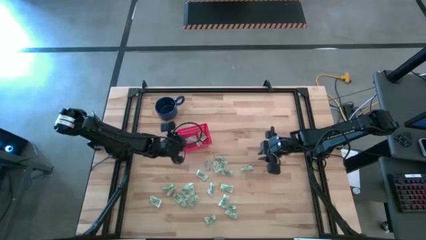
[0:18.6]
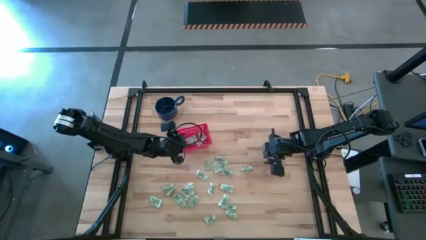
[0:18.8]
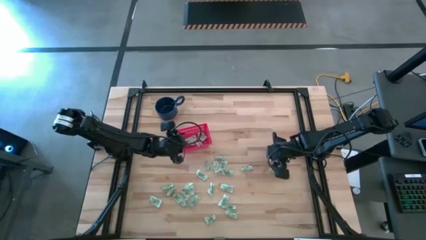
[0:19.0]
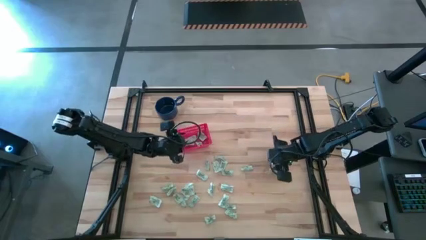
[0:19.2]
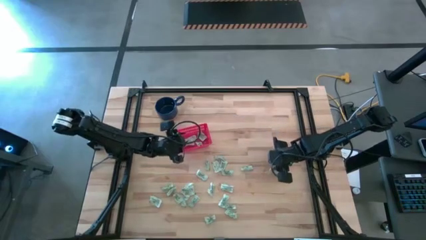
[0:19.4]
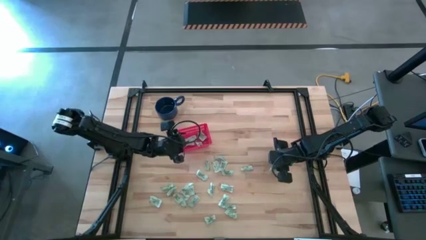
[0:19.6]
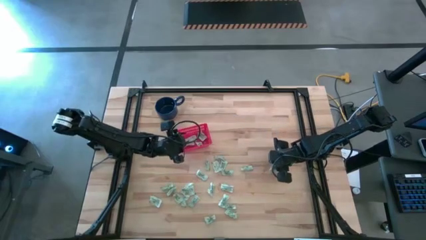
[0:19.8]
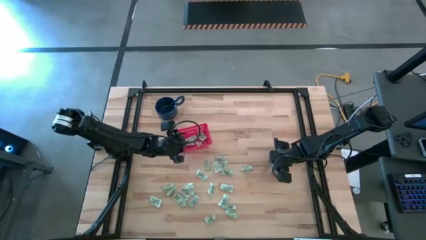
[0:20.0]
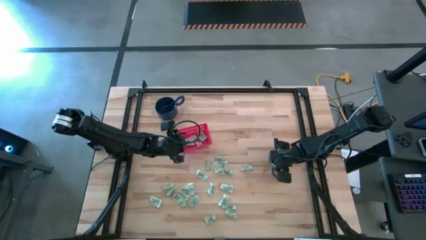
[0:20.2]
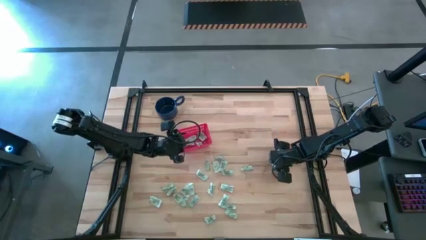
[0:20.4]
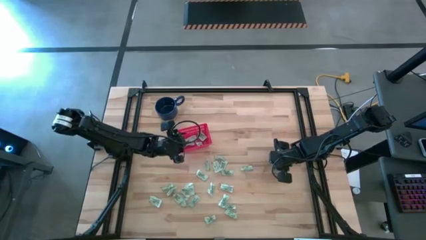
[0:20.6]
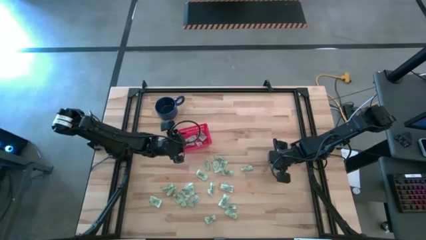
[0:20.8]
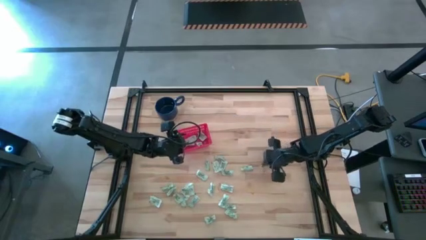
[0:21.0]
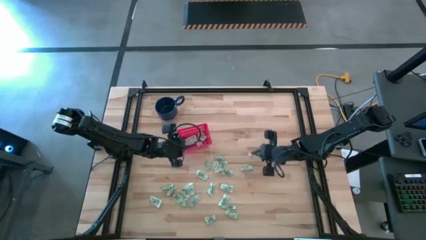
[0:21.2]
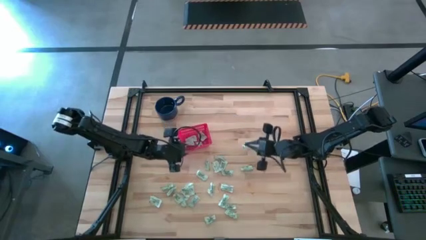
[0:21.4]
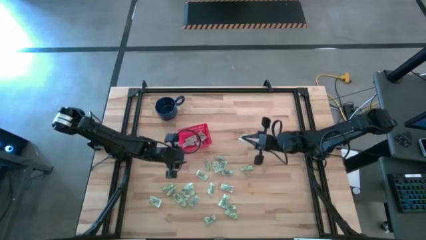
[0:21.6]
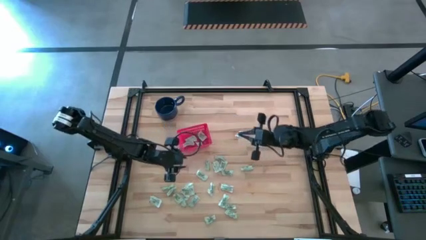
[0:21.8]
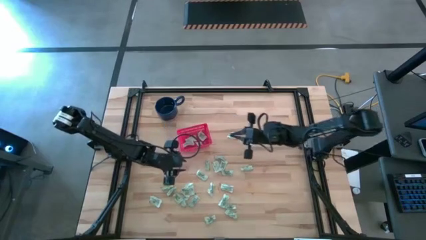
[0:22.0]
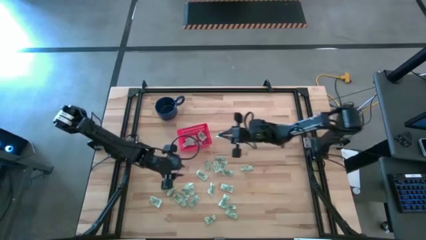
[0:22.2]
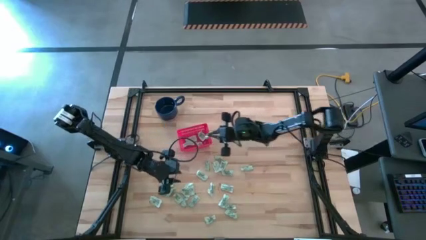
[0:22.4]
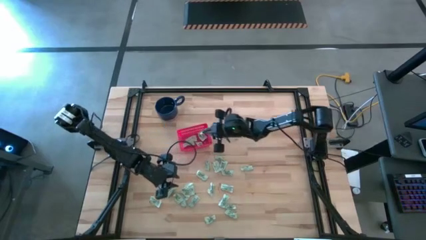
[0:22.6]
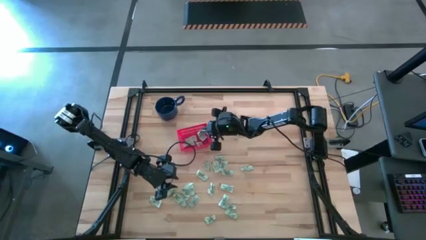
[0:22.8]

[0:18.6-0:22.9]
Task: Pick and place items into bin
Put the green stevia packet into the red bin

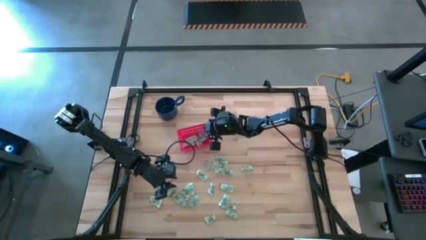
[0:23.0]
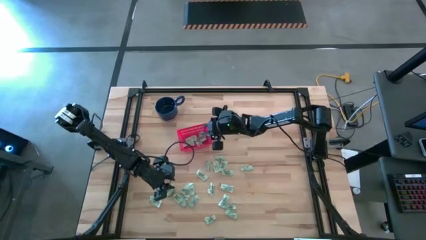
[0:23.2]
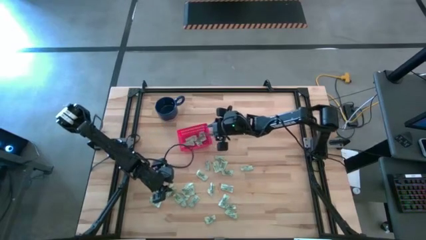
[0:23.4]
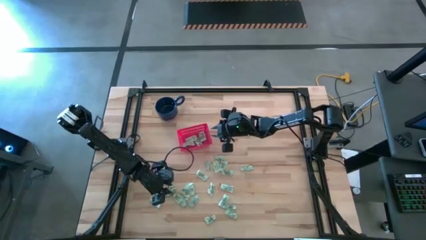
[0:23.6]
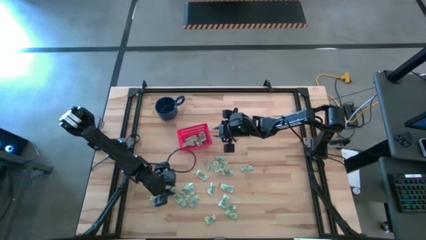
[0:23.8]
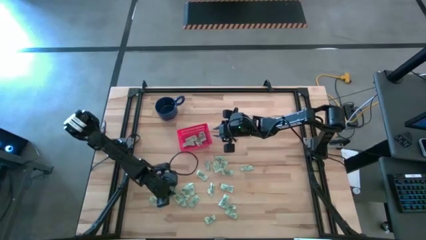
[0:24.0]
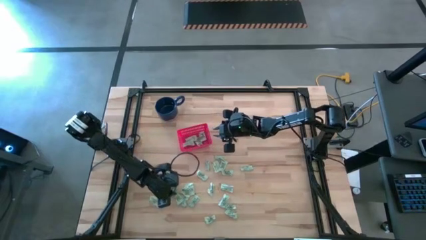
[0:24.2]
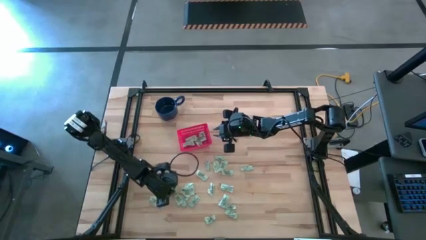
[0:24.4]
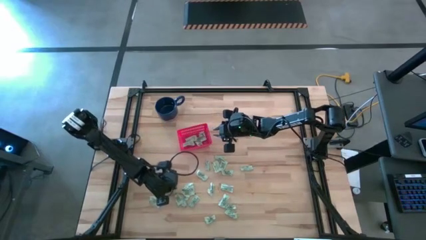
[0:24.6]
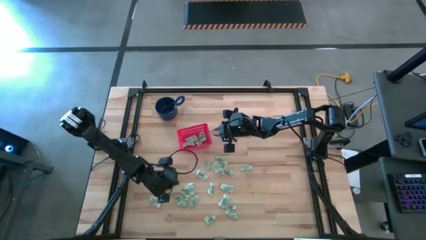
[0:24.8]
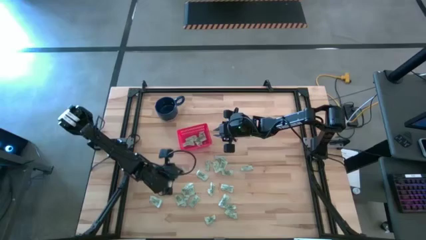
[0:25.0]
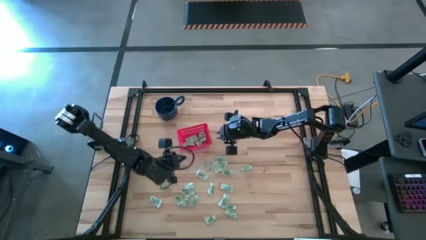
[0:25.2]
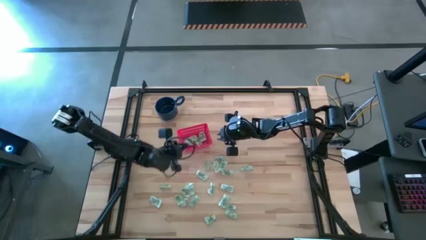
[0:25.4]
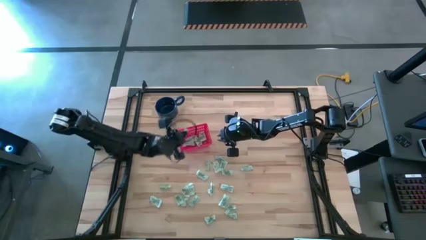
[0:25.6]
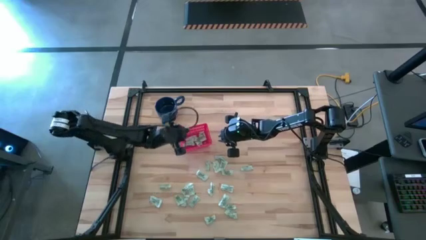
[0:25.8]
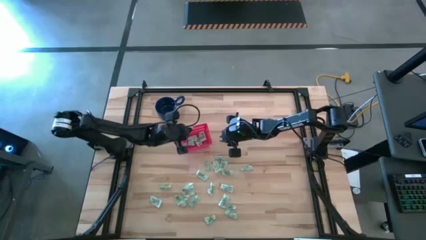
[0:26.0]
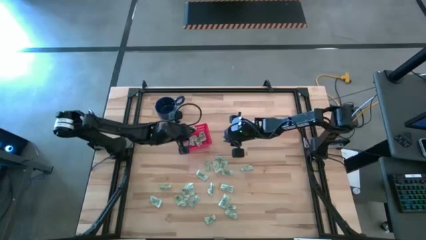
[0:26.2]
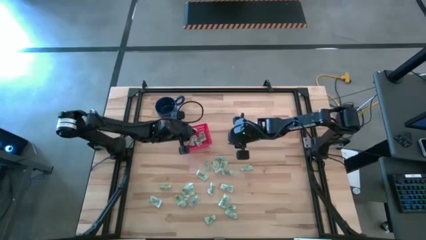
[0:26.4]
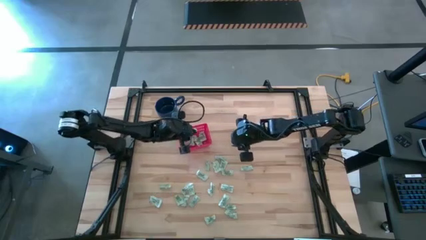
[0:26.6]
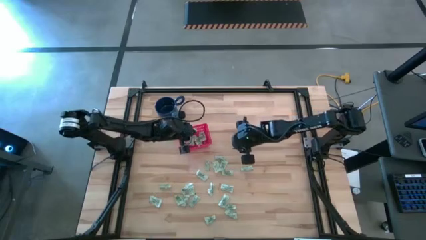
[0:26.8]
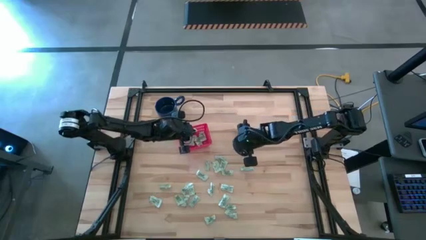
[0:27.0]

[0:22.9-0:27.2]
Put the green stevia packet into the red bin

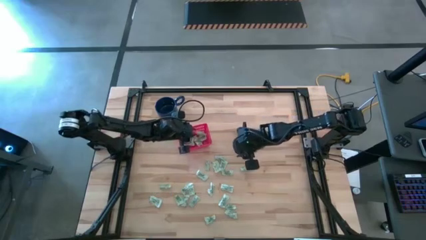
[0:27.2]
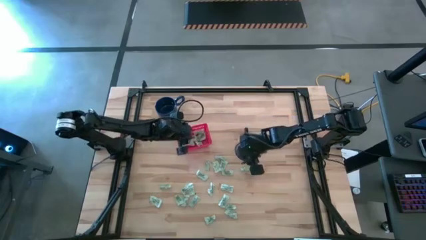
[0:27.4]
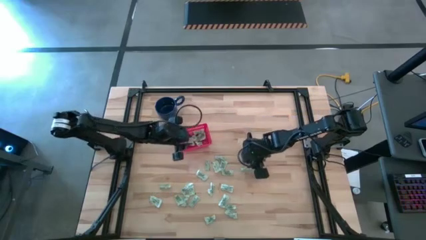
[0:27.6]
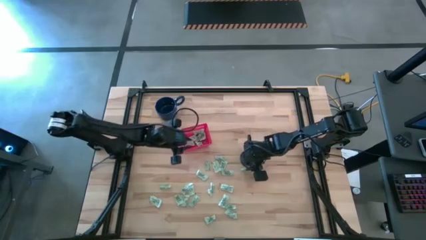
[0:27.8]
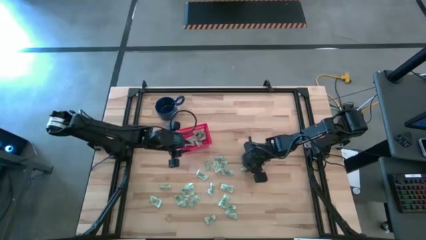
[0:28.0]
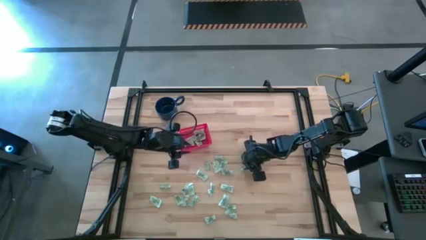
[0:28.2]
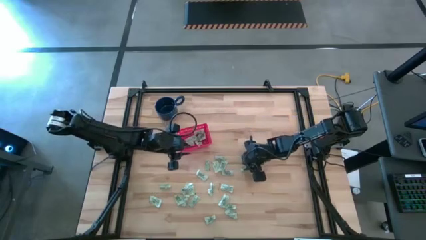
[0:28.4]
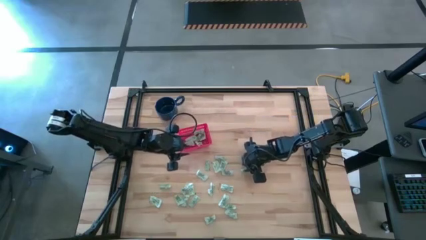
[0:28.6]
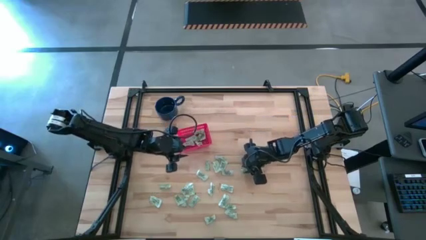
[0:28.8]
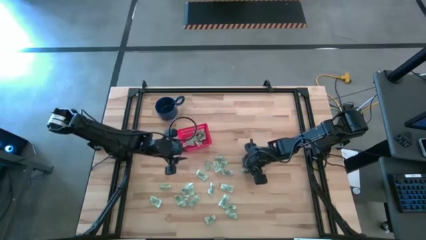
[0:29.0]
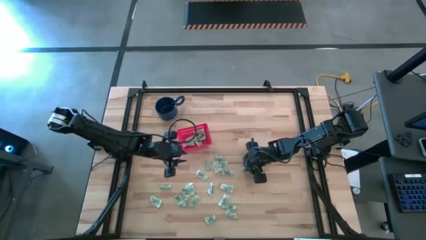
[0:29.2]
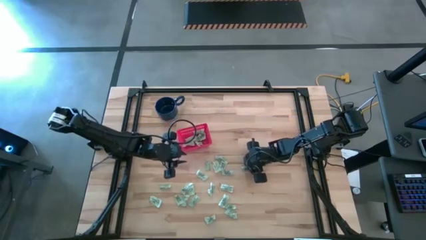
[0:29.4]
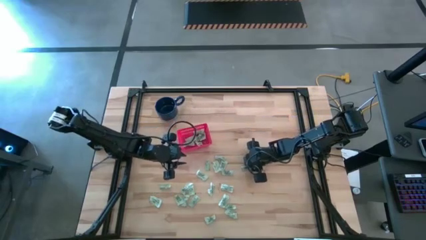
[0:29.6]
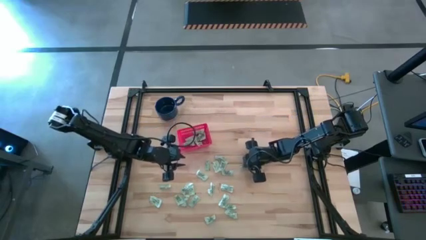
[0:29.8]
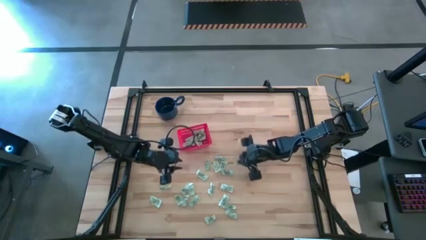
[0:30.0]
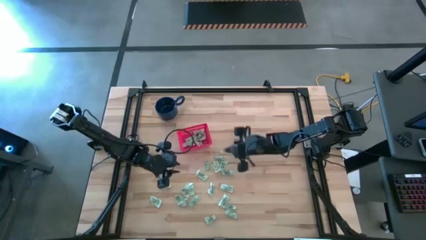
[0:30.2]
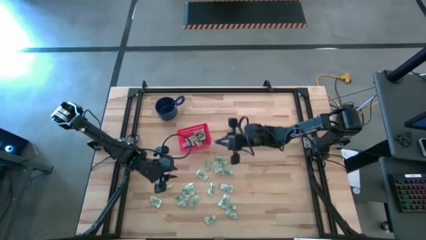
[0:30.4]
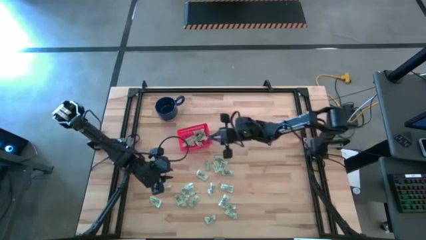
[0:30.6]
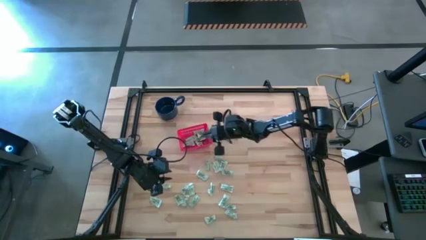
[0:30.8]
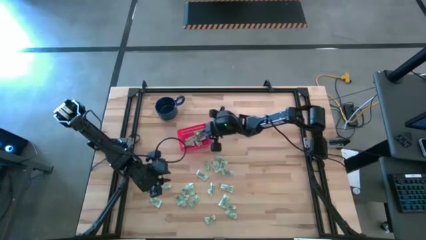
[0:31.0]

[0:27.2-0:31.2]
Put the green stevia packet into the red bin

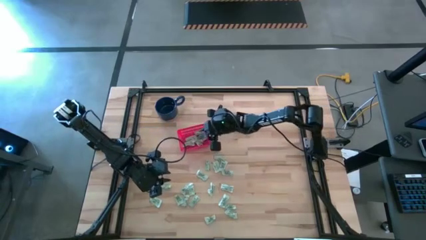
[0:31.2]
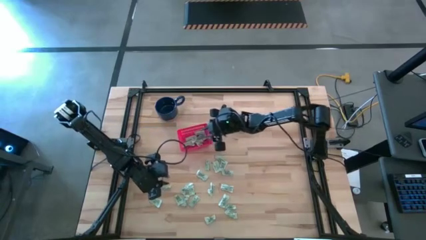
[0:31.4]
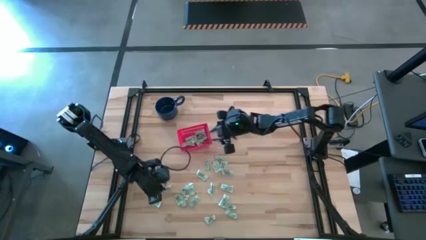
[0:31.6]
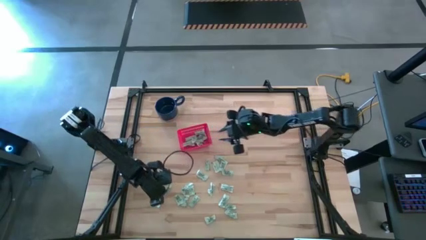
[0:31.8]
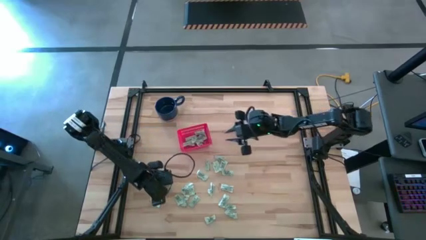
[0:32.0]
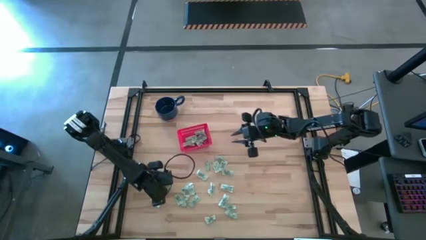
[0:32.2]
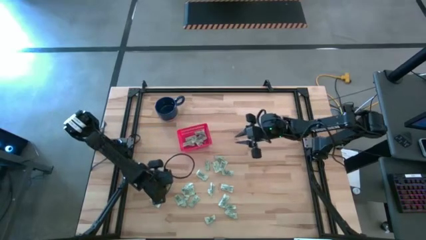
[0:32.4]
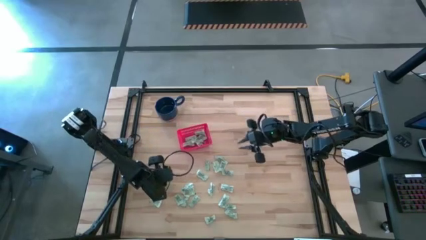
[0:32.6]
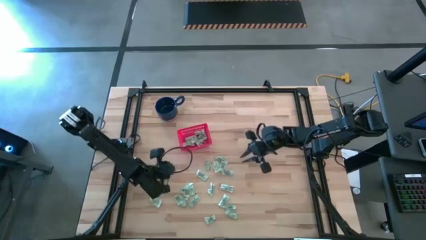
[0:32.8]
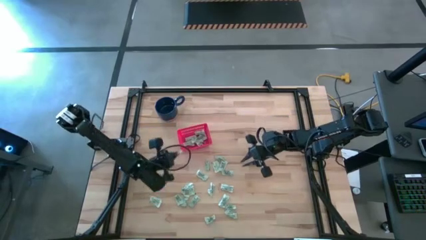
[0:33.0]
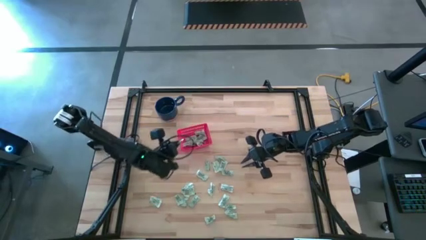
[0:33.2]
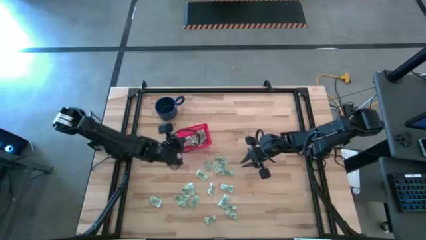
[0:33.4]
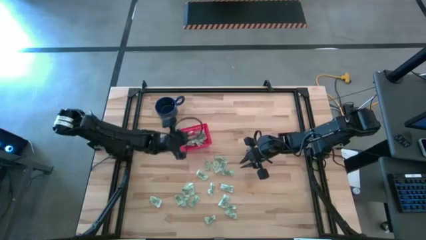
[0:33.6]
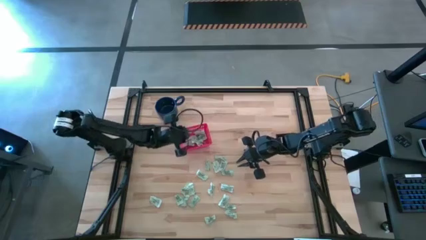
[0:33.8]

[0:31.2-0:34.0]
Put the green stevia packet into the red bin

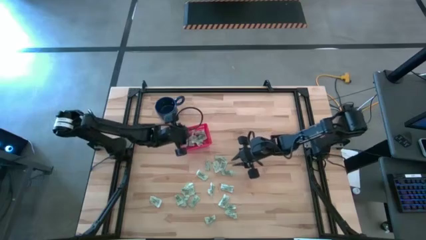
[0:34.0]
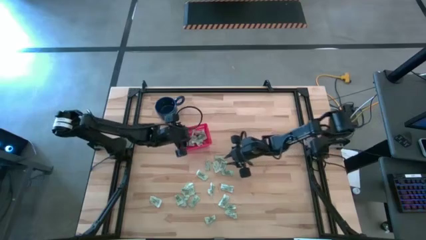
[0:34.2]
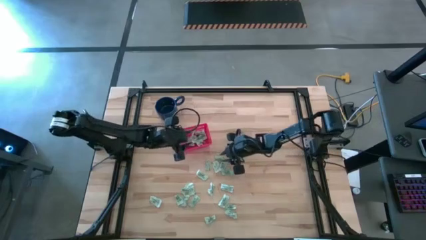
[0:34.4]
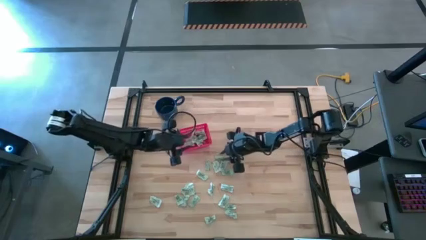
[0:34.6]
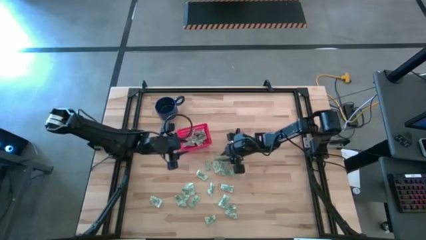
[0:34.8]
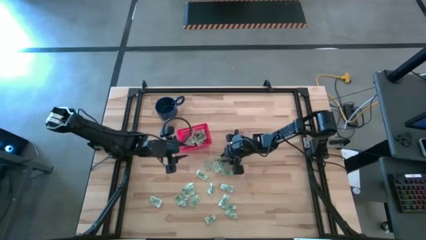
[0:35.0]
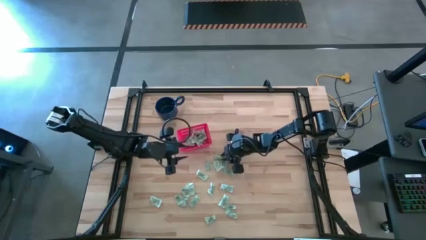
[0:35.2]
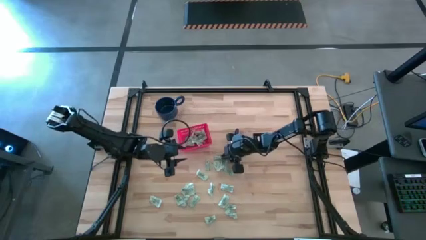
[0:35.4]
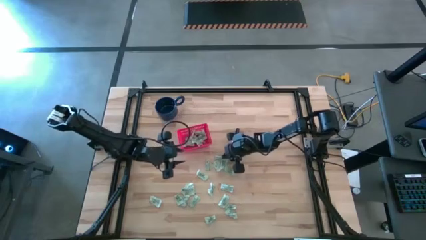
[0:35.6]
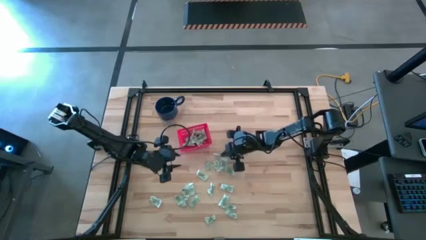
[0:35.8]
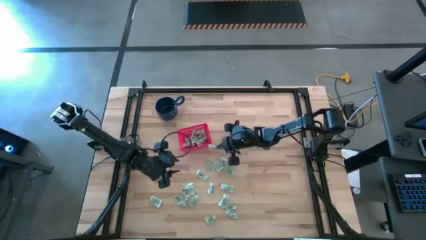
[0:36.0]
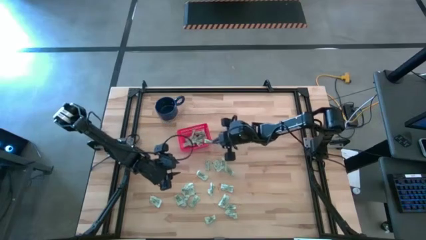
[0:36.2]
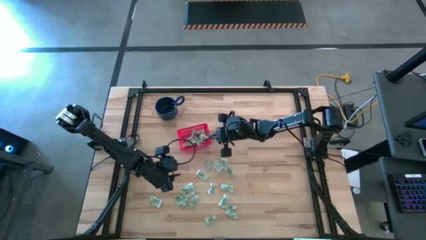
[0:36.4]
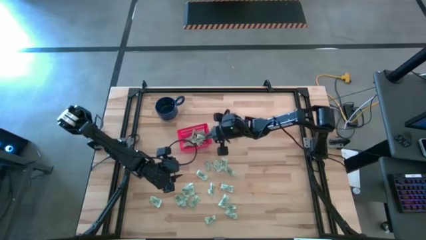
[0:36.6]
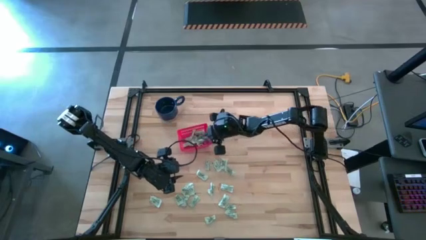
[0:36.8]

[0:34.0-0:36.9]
Put the green stevia packet into the red bin
